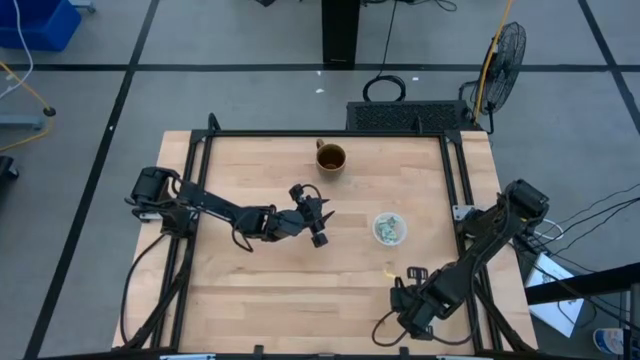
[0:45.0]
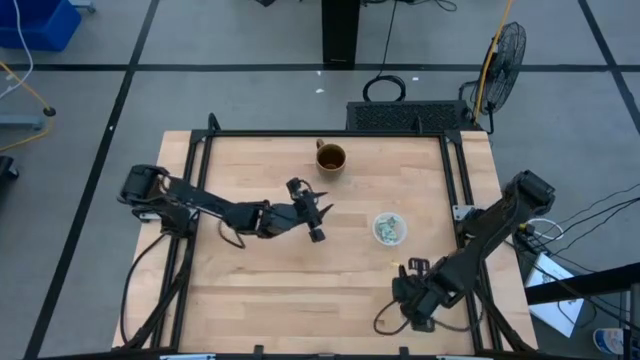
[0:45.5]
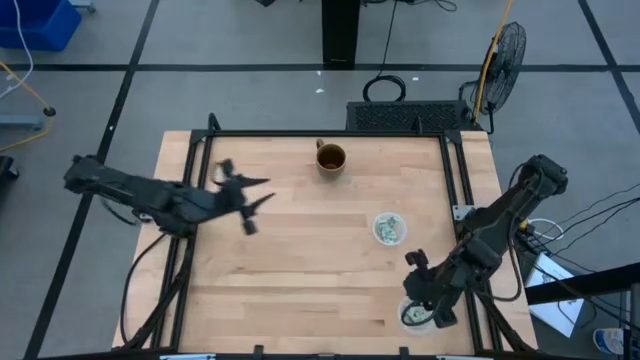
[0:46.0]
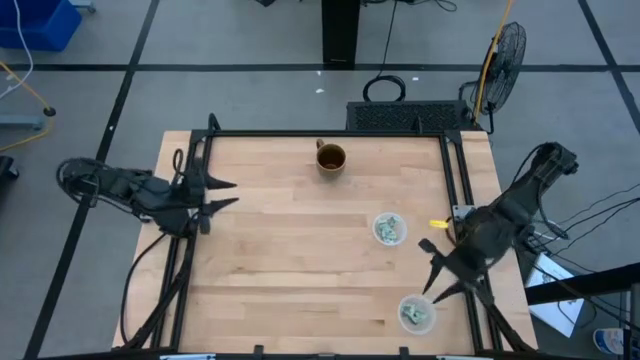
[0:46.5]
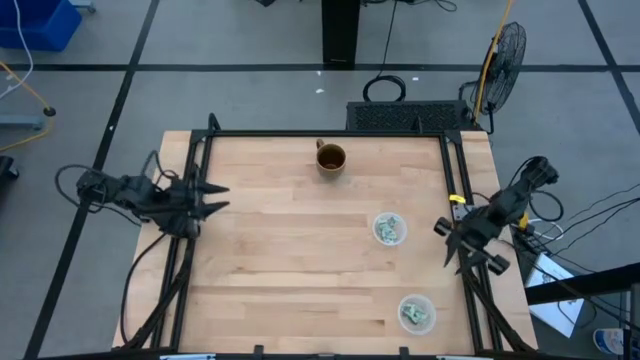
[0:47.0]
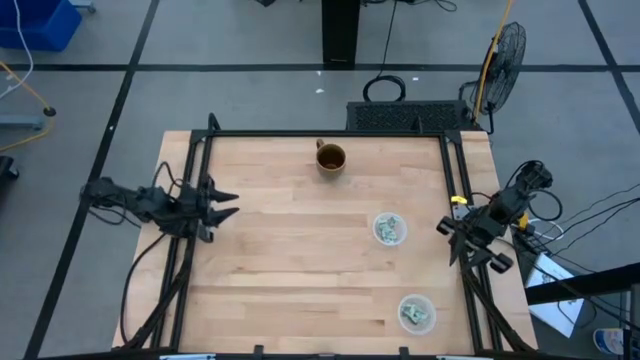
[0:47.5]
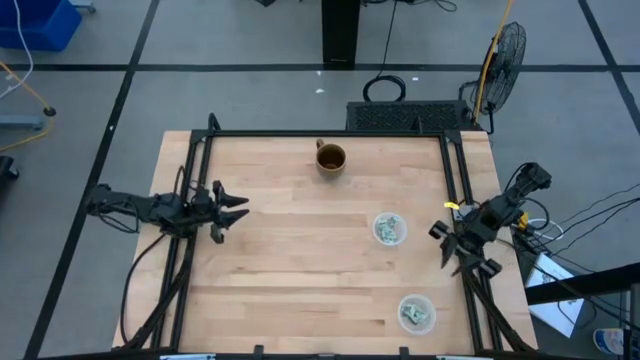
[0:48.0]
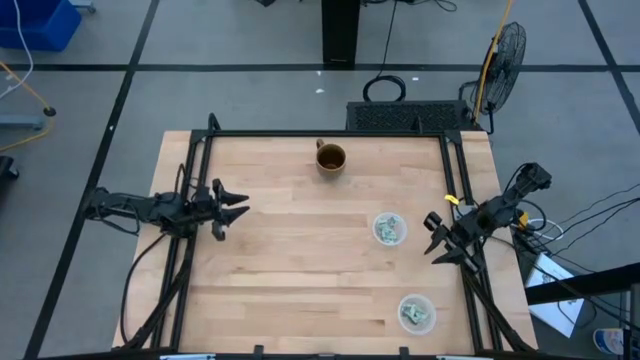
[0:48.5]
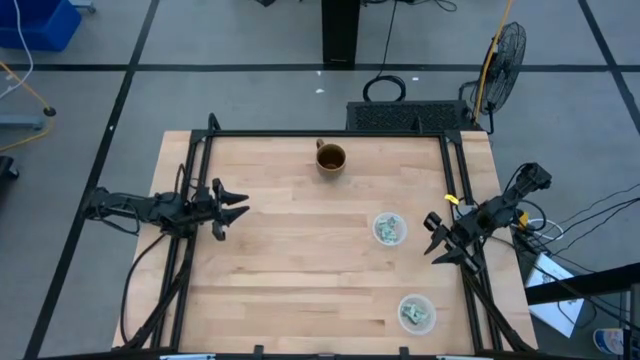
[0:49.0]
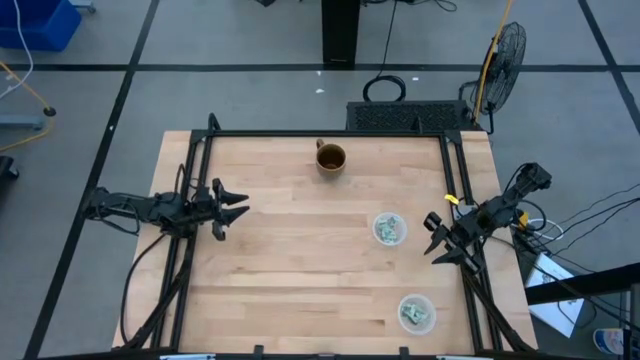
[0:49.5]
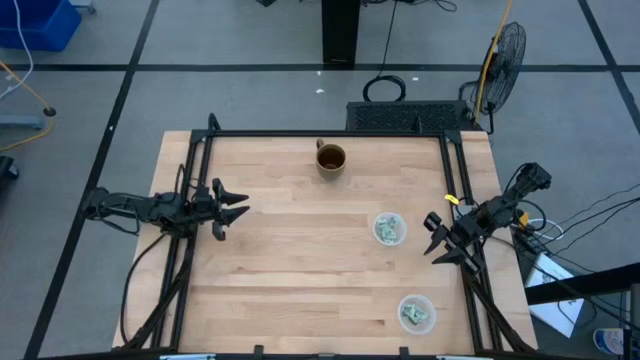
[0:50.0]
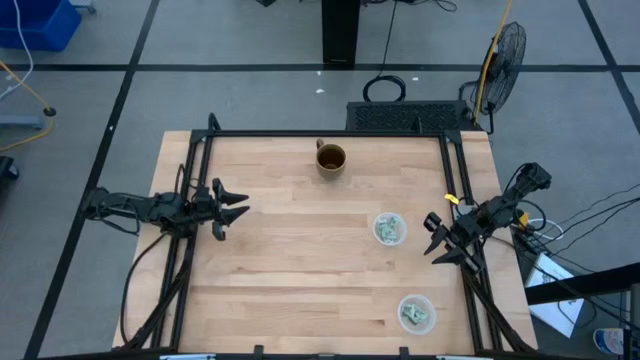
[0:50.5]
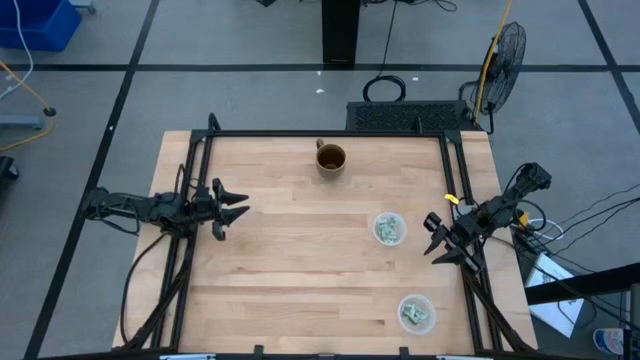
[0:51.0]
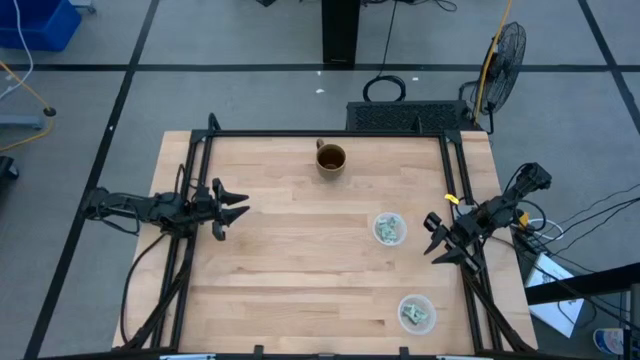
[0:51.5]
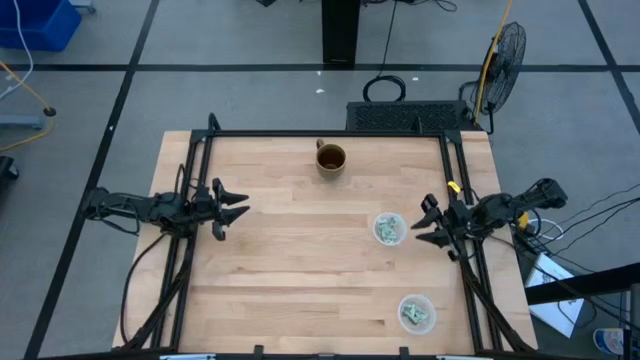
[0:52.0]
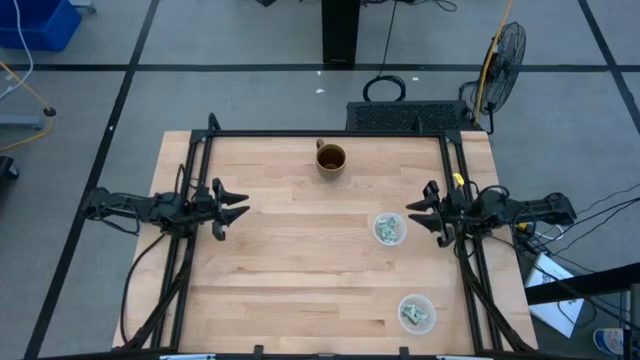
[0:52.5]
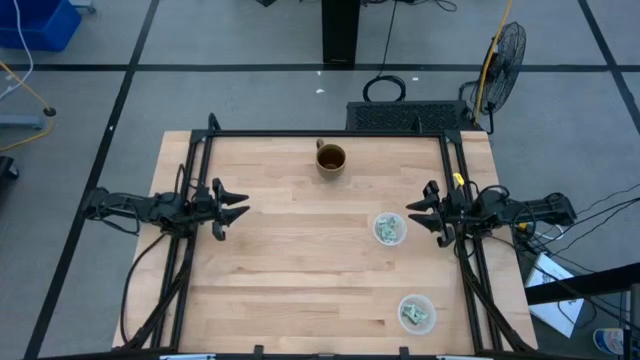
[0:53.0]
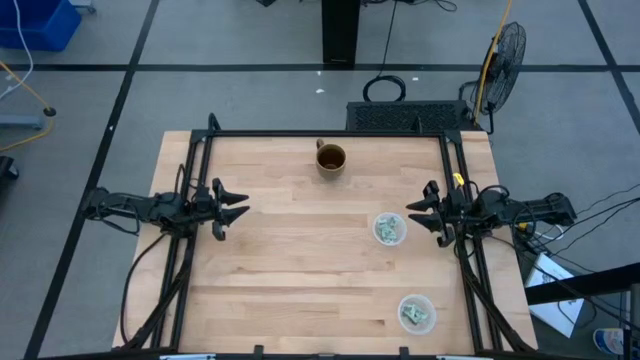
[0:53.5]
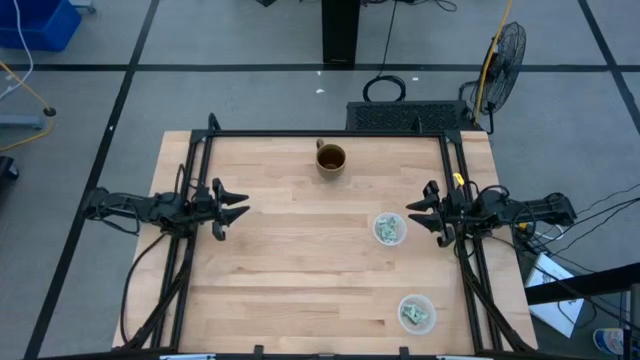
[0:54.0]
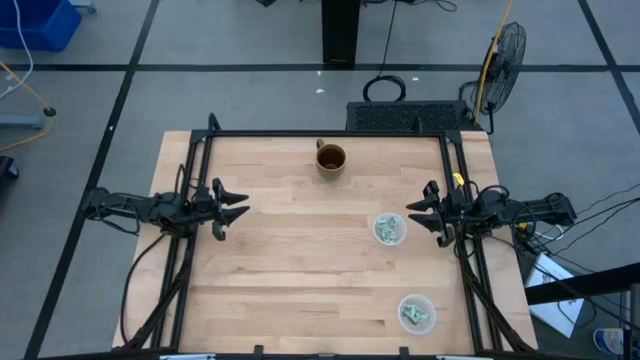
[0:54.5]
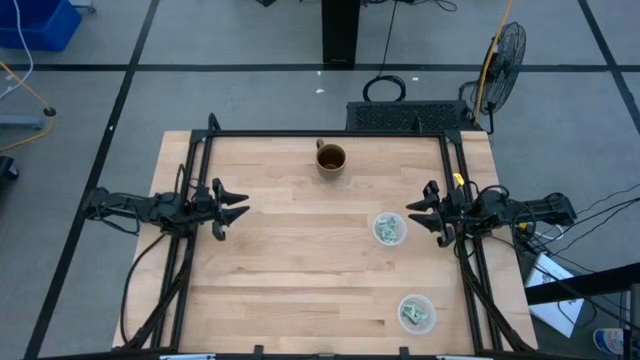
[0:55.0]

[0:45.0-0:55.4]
Task: Pick and place items into bin
Return to Home Position

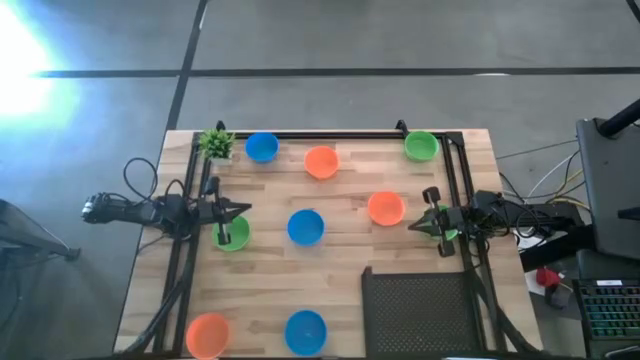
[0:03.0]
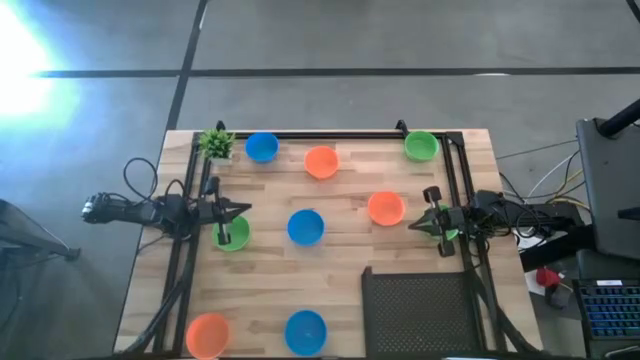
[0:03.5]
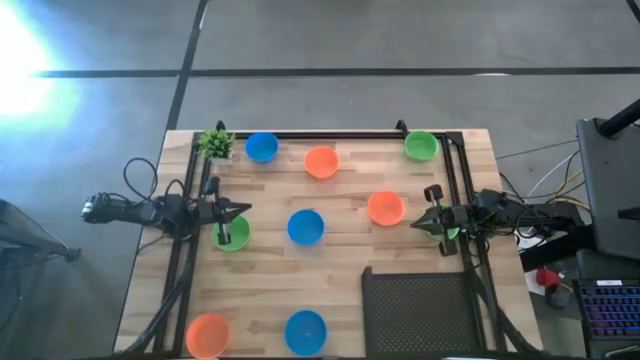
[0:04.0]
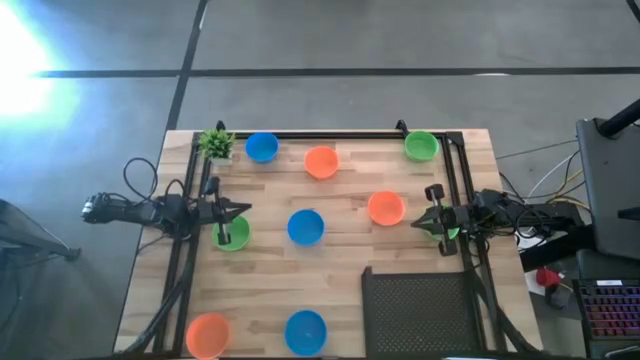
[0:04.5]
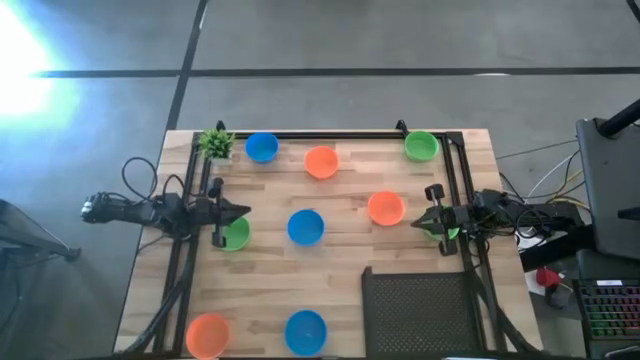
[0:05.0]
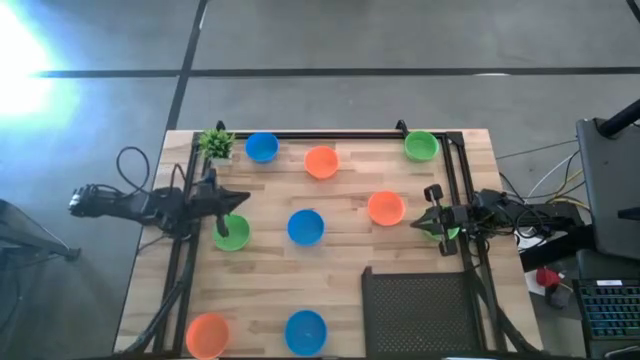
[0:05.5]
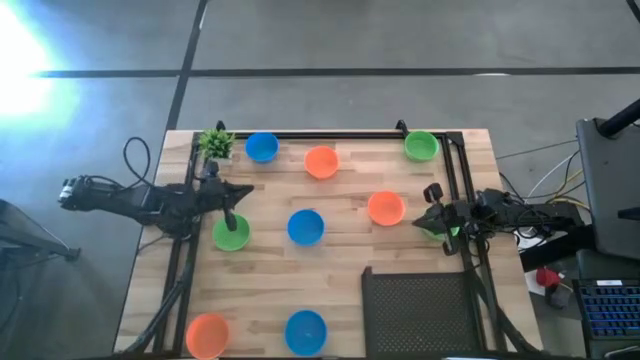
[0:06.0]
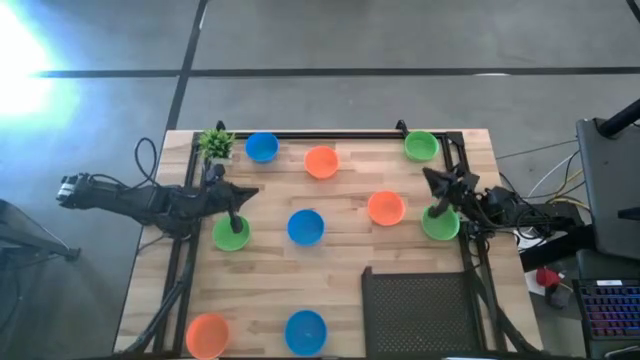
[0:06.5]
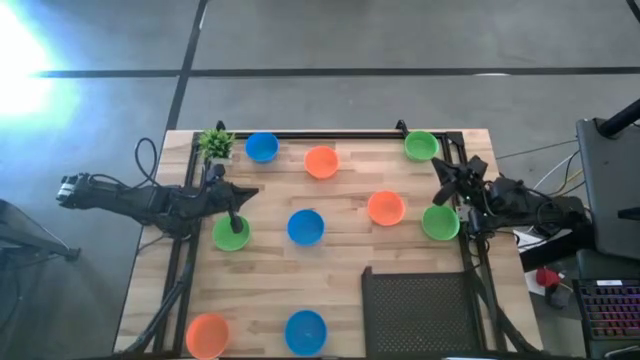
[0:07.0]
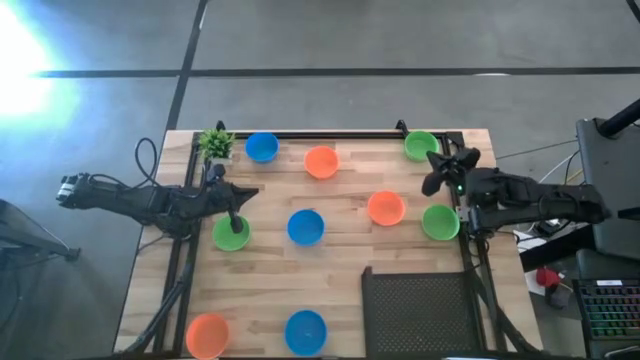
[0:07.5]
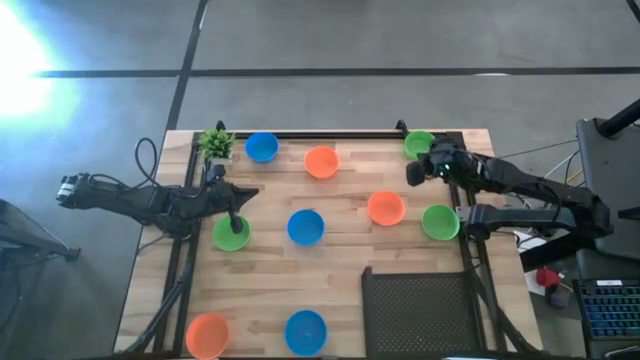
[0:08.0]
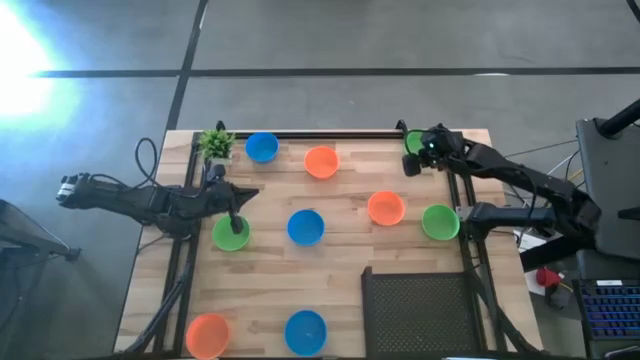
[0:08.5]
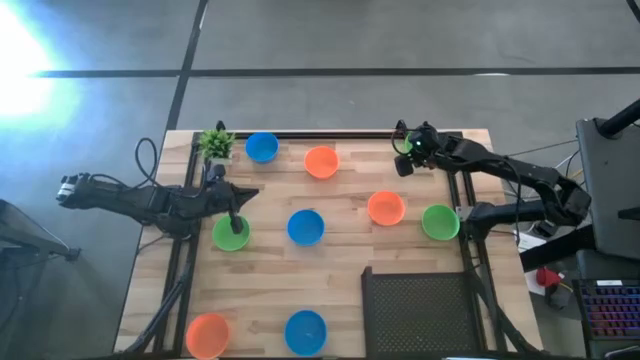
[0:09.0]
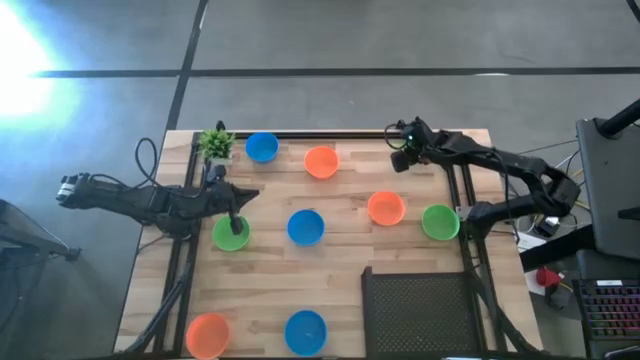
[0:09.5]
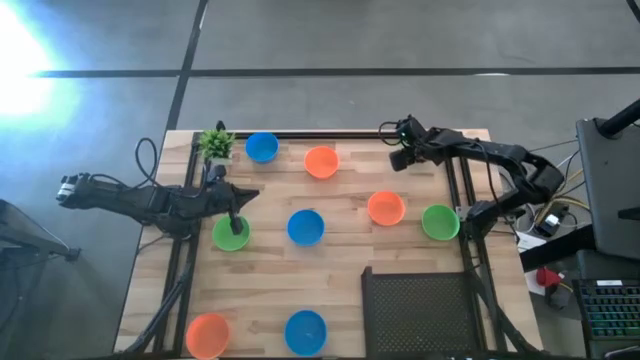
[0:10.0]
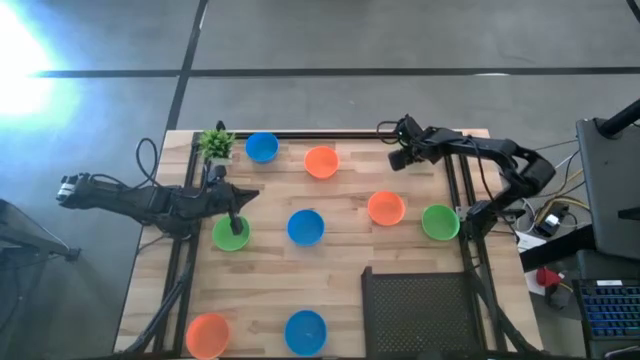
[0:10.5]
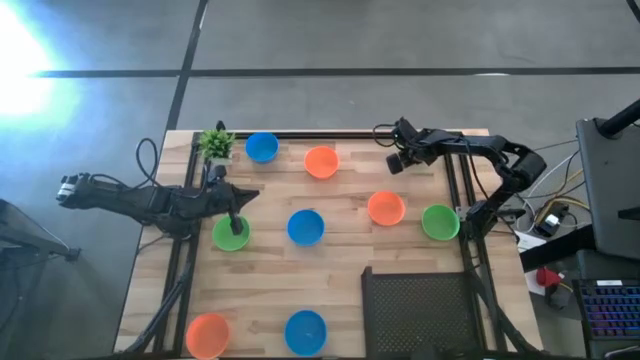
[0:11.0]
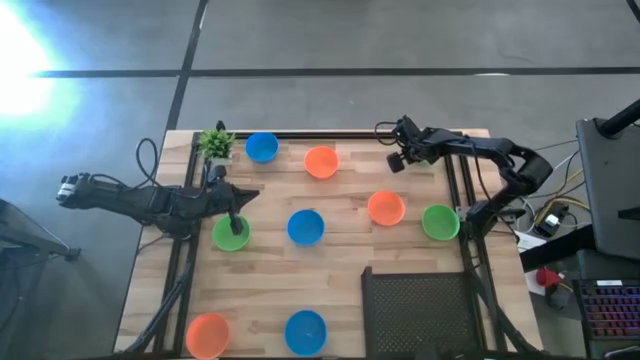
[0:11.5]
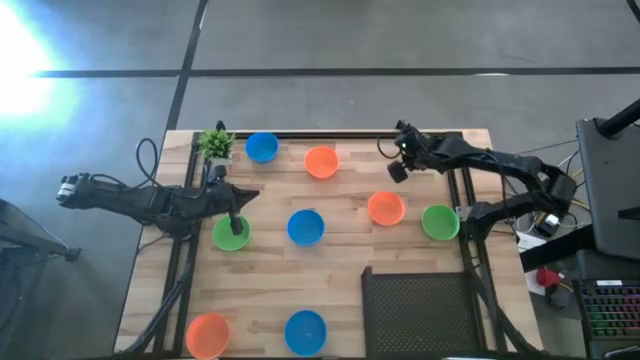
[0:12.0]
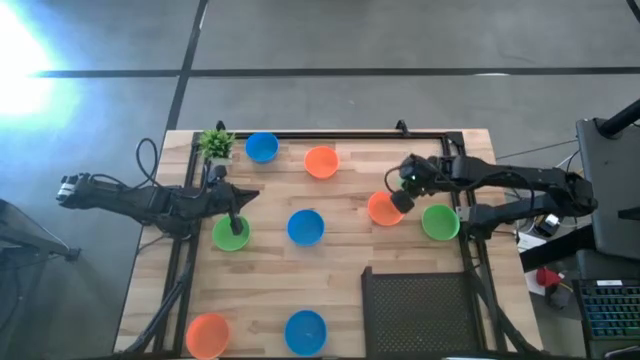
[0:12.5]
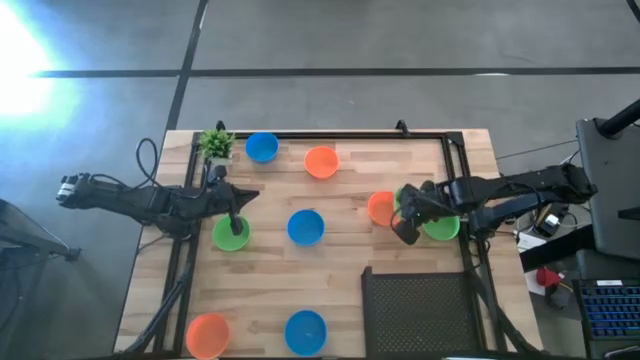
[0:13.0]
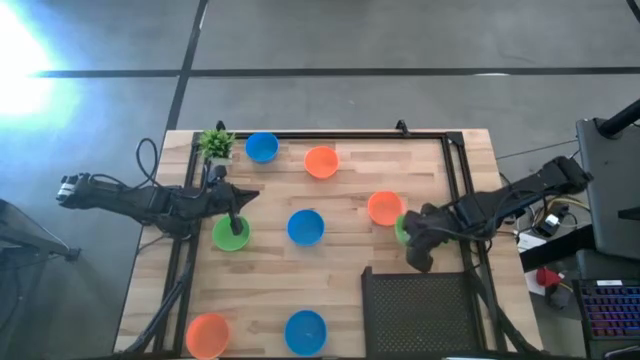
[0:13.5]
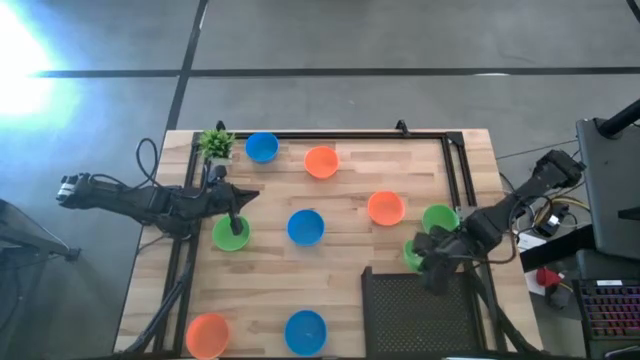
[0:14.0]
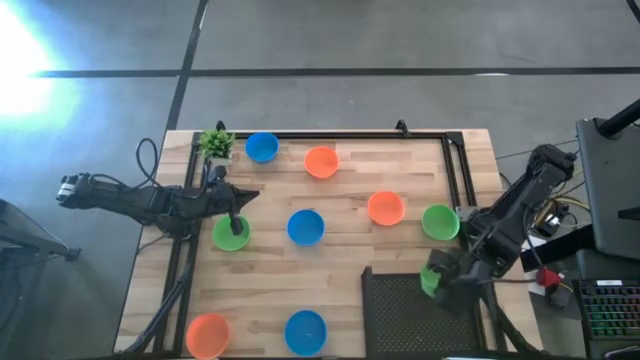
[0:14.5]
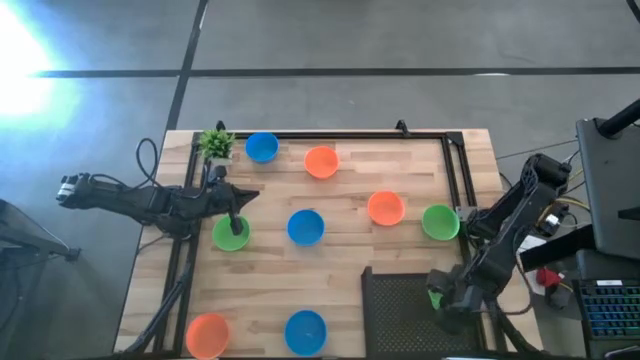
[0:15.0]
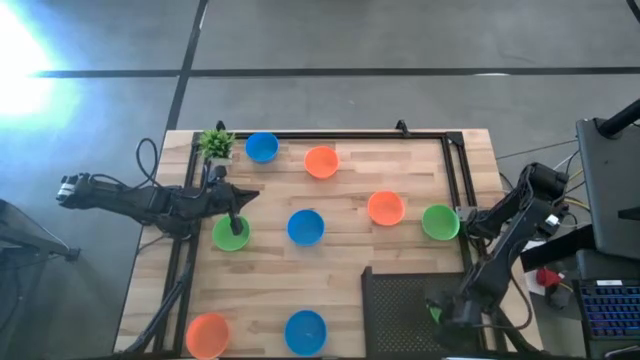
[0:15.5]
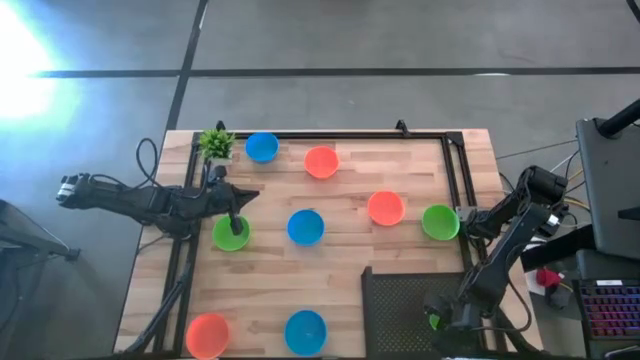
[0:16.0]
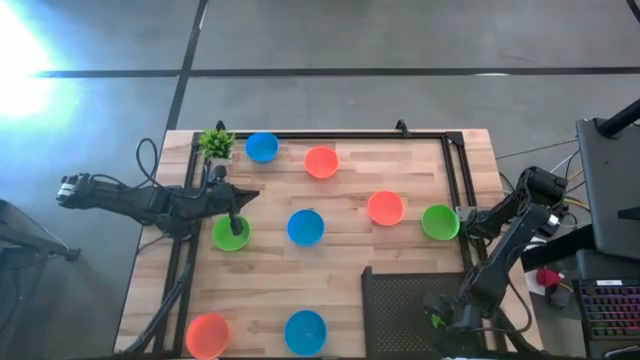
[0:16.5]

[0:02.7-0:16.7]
Task: Pick & Place Mini bowls
Put the top right green bowl on the shelf
